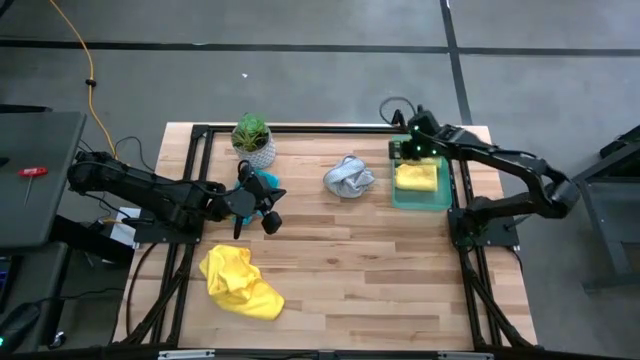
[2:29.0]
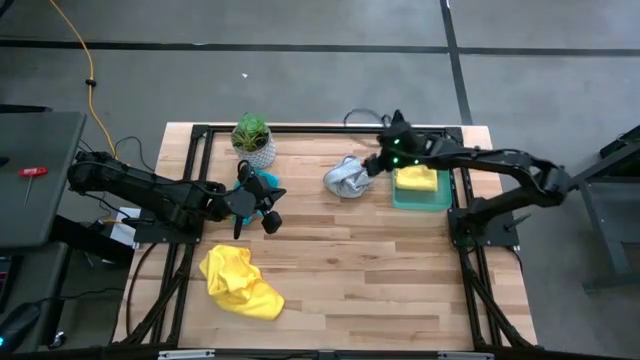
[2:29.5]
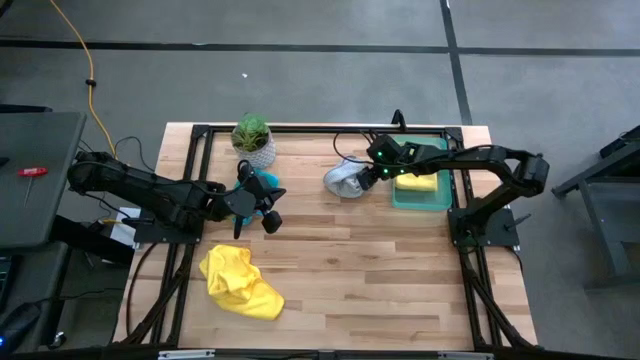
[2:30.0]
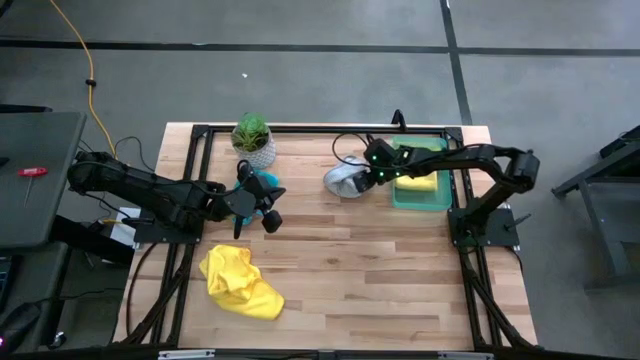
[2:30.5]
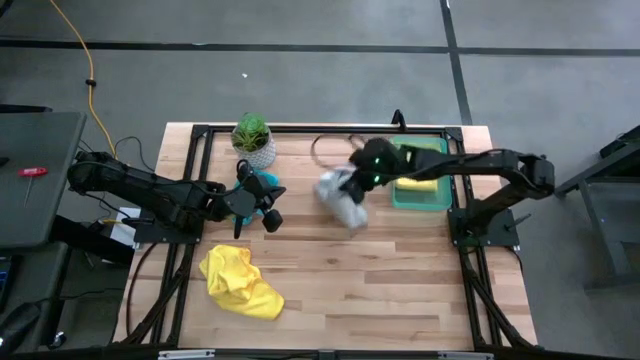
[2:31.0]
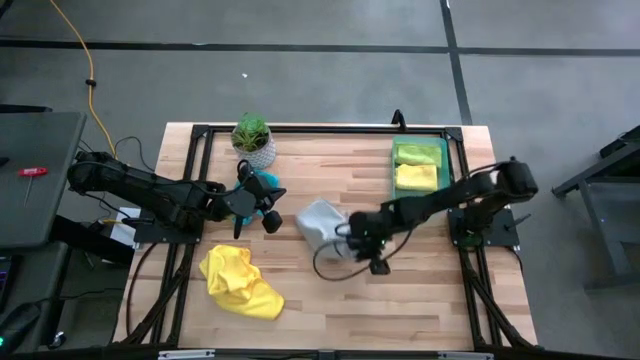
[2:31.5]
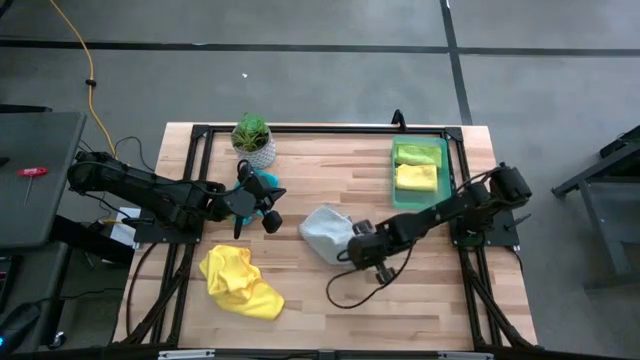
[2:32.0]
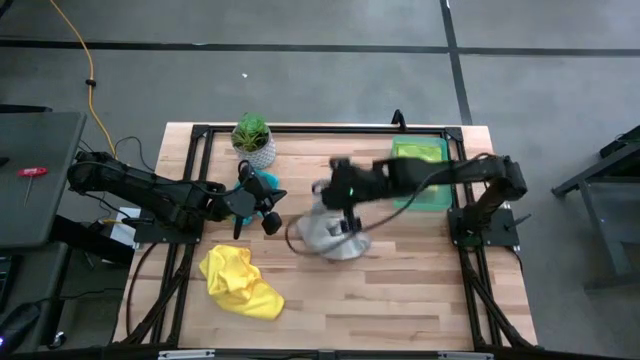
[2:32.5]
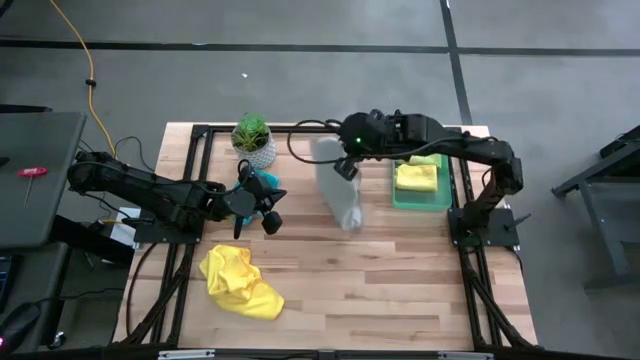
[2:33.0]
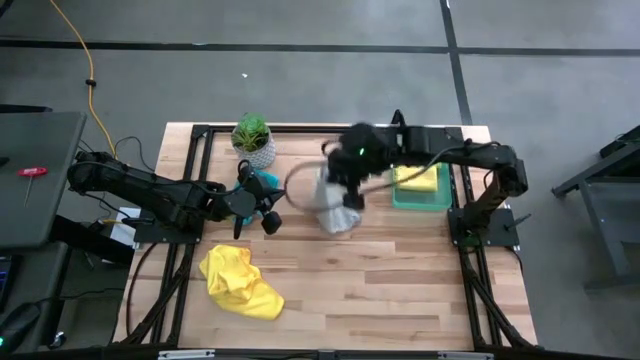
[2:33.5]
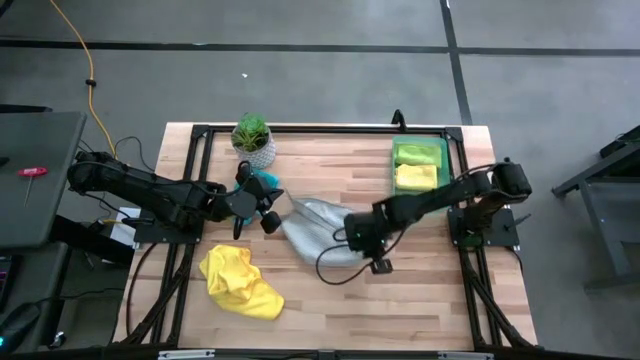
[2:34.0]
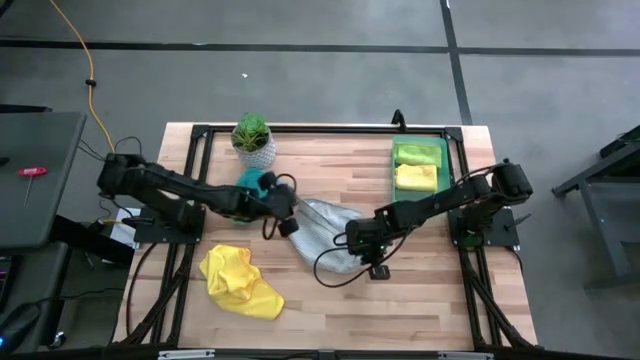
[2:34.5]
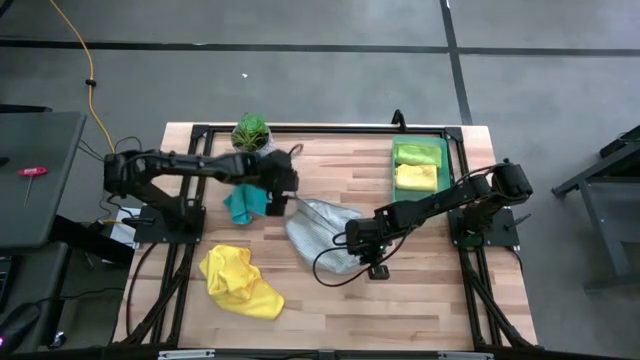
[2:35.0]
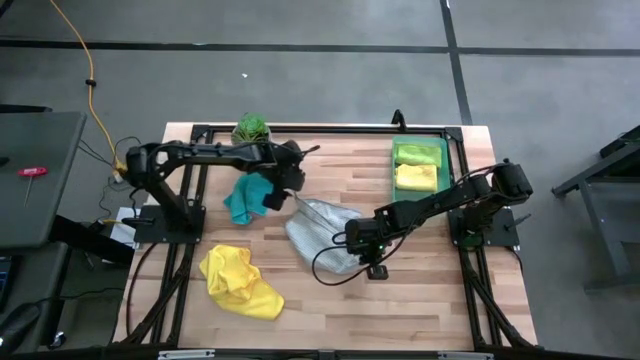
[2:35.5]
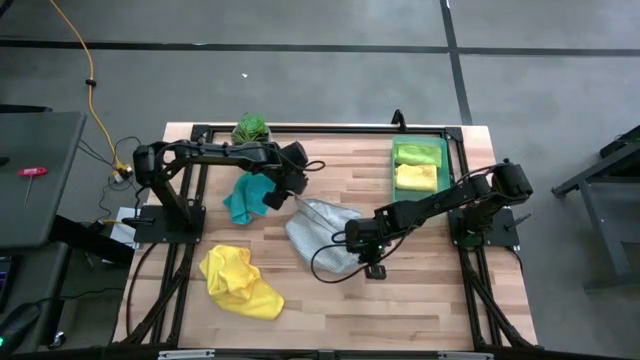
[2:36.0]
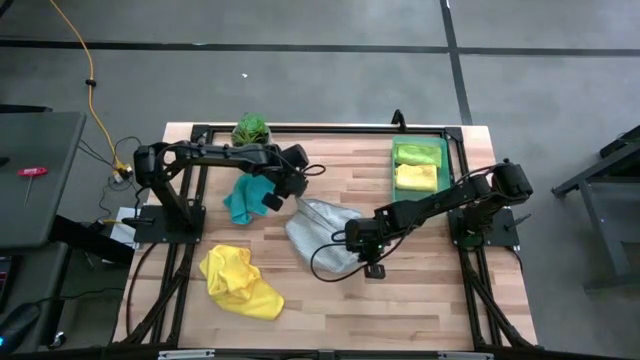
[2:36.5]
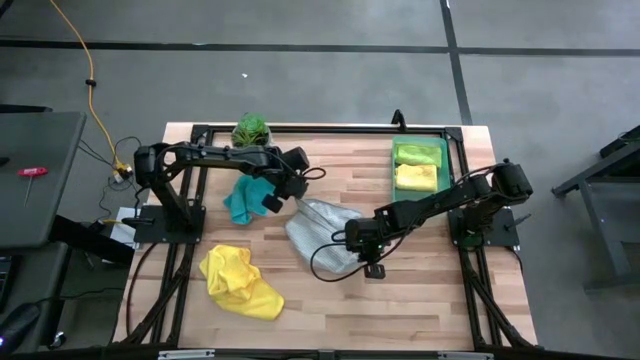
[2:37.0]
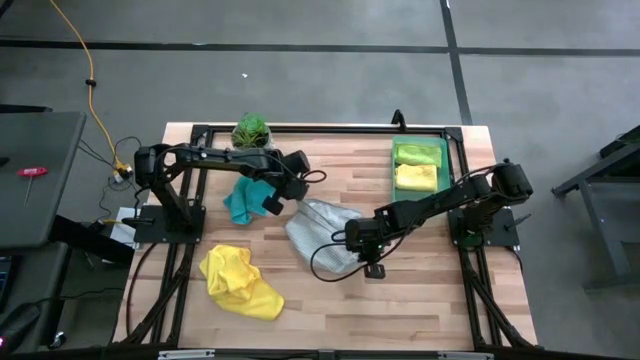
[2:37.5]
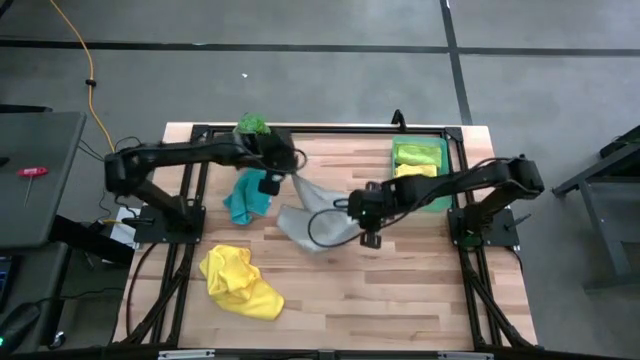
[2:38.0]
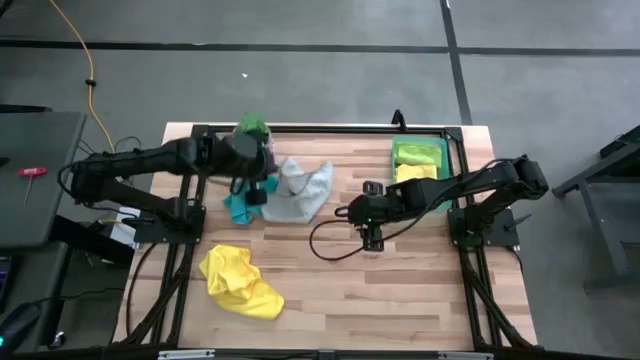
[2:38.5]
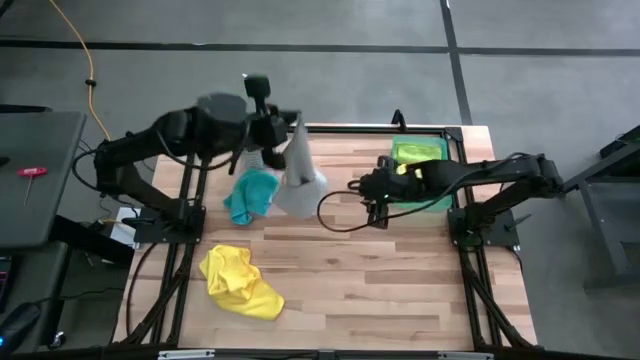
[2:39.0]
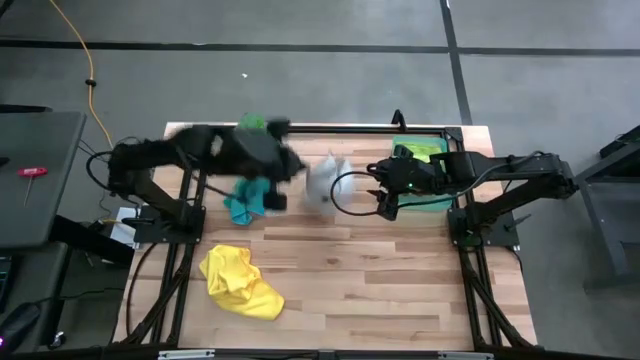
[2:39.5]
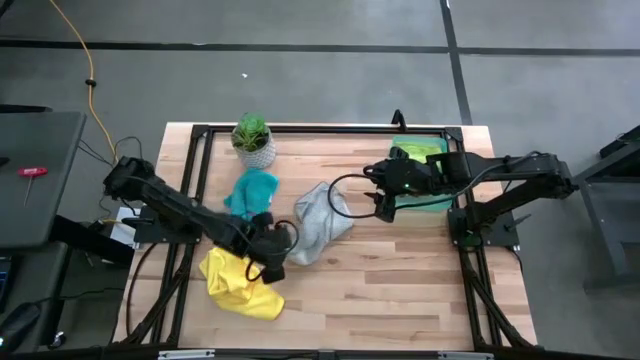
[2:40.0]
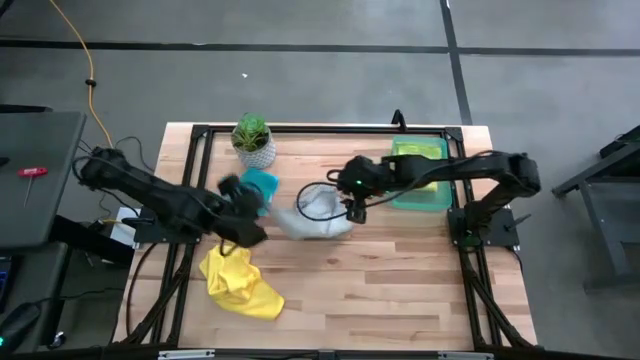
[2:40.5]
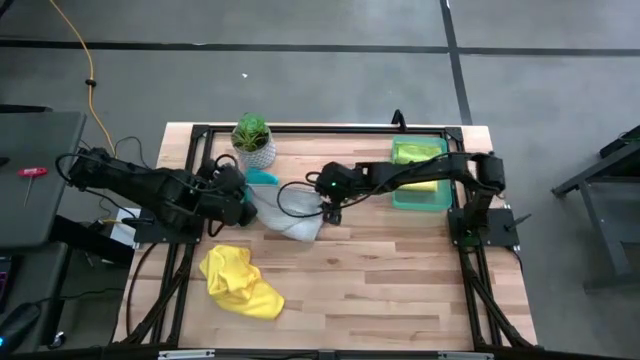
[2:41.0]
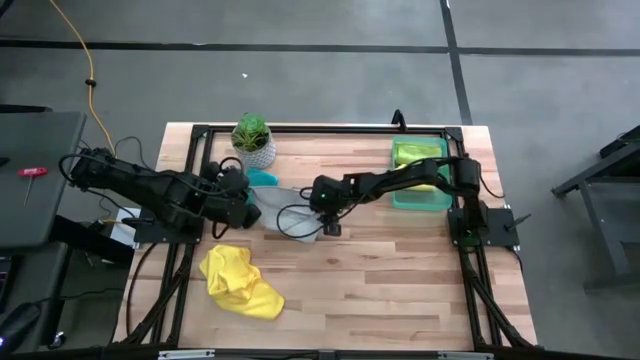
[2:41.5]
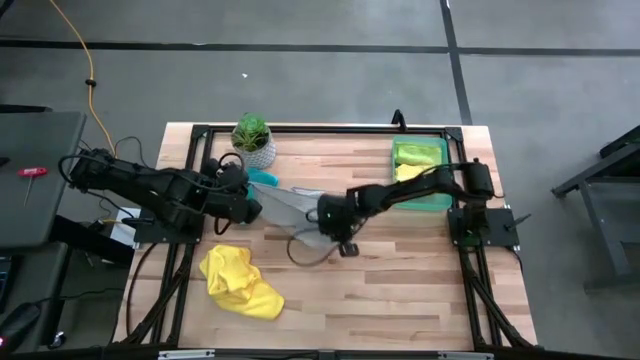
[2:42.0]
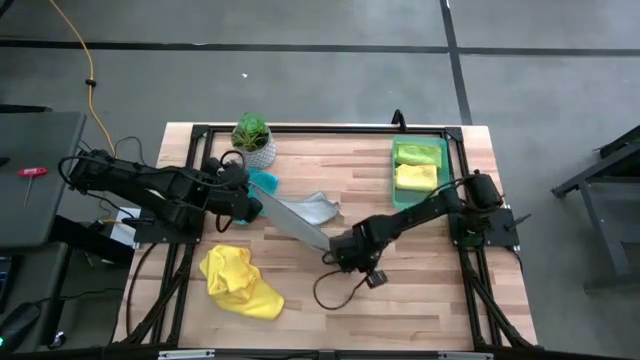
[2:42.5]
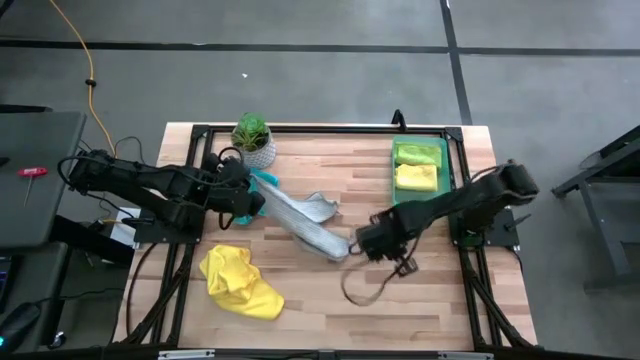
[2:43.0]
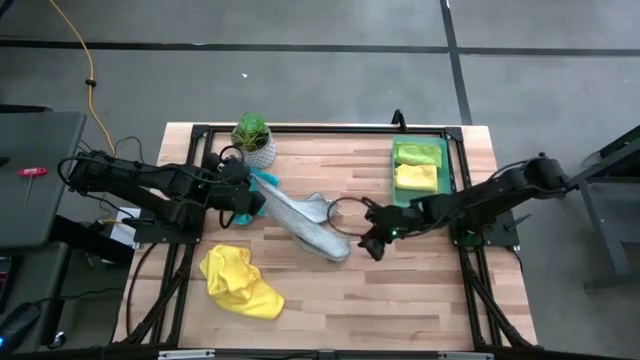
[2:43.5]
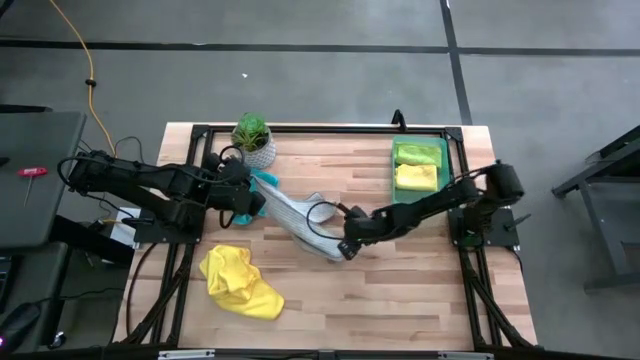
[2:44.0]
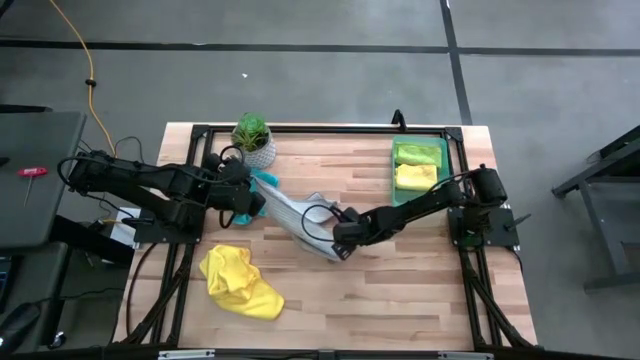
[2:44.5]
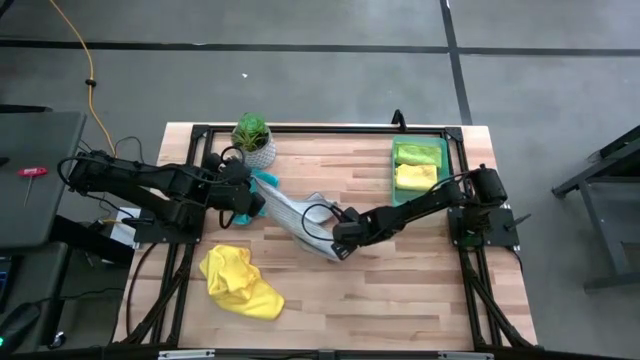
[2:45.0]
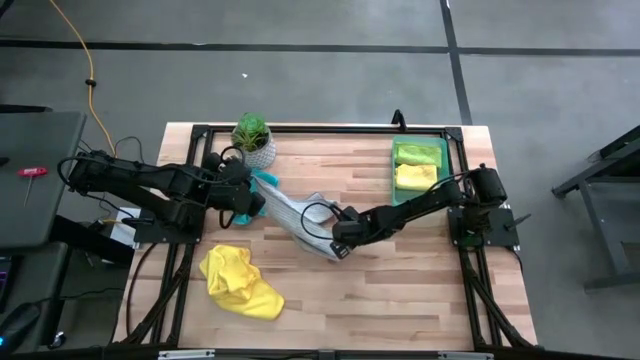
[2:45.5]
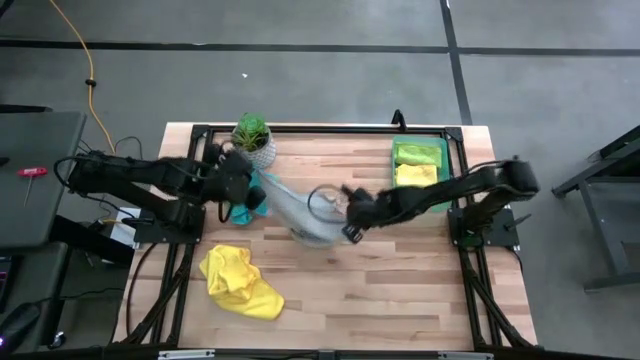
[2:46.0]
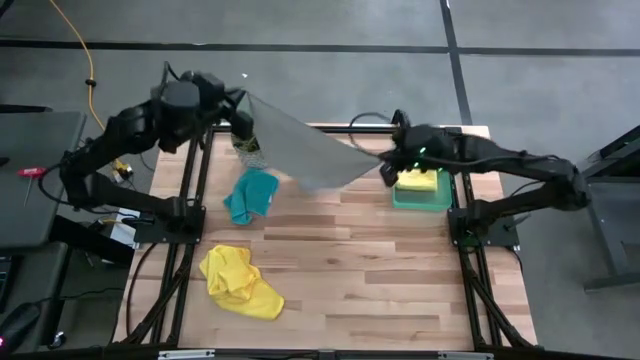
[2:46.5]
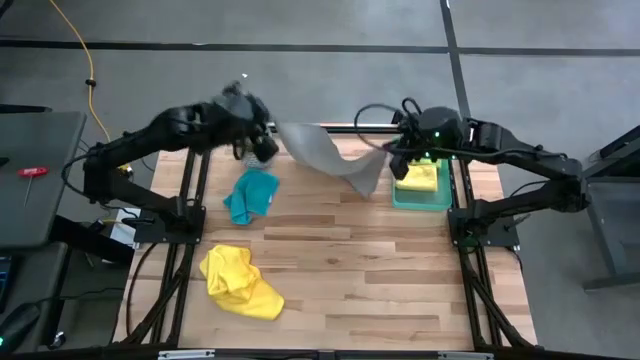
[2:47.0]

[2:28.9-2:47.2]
Task: Fold microfiber towels
Fold the gray microfiber cloth

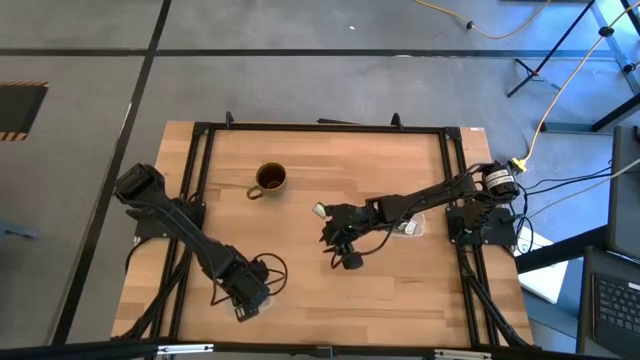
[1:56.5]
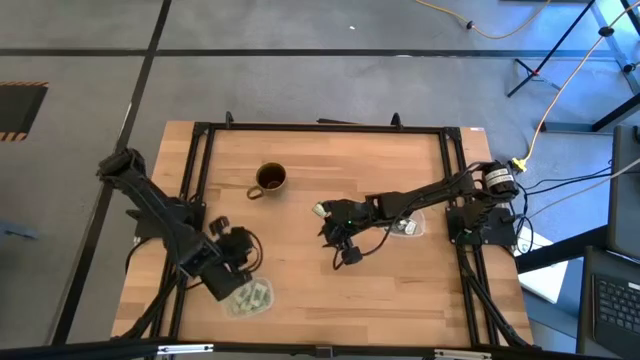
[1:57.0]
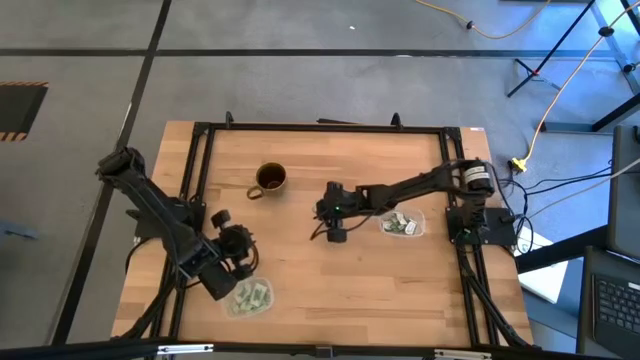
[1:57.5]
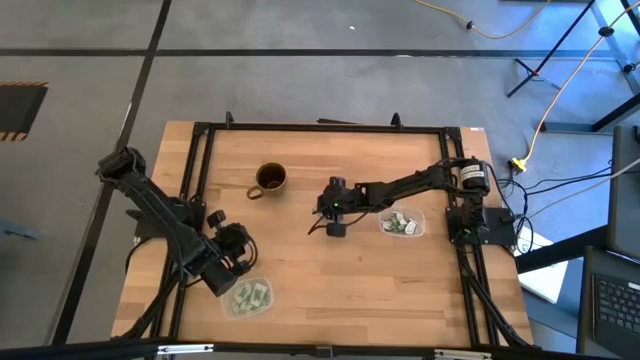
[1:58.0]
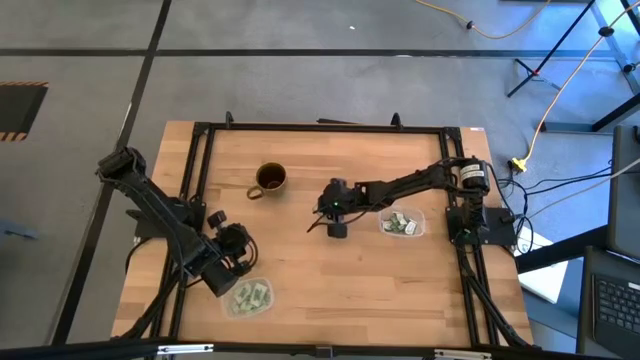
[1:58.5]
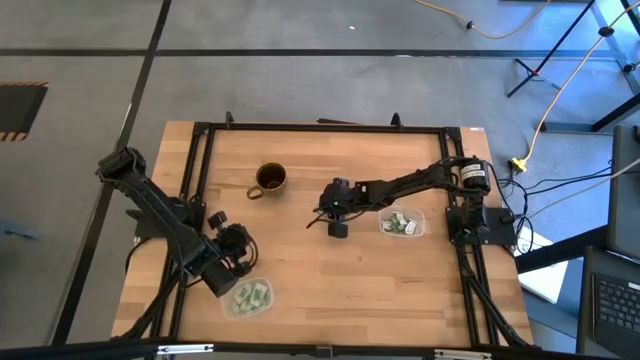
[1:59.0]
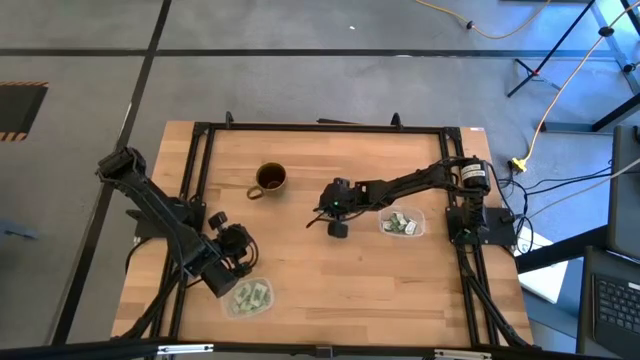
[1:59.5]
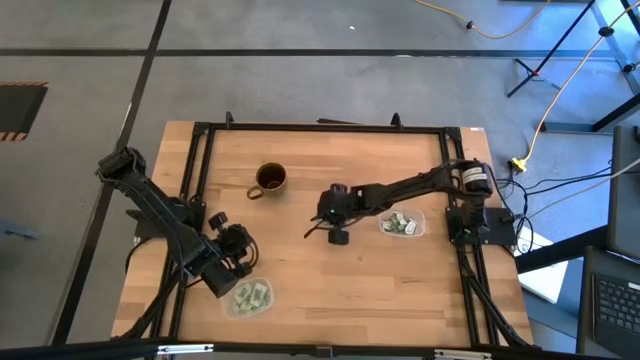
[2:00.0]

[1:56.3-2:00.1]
Task: Pick and place Stevia / Truvia into bins
Put the truvia packet into the top transparent container
